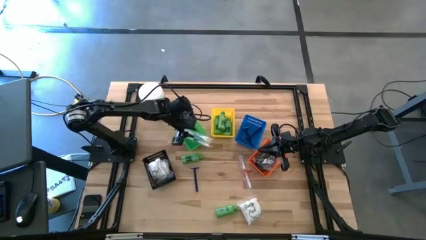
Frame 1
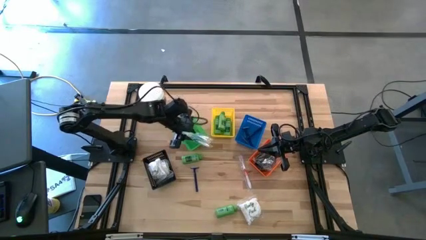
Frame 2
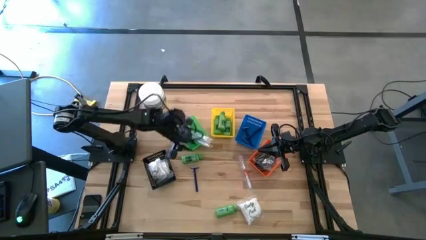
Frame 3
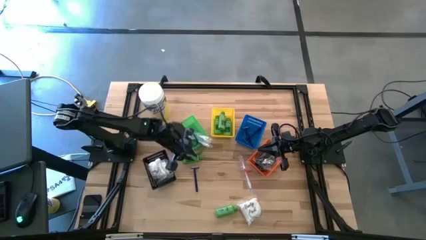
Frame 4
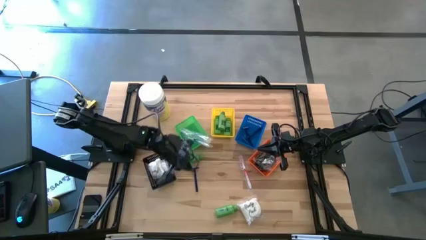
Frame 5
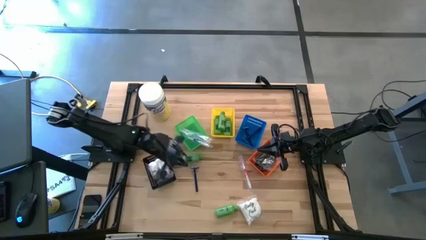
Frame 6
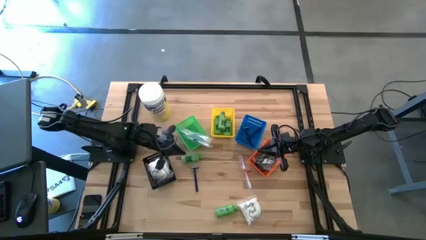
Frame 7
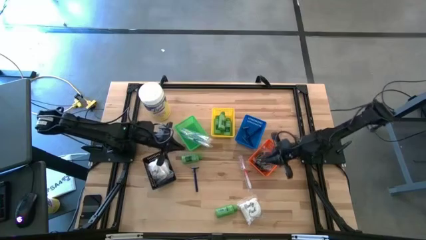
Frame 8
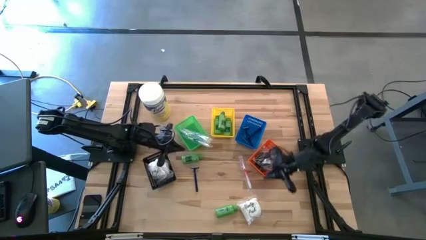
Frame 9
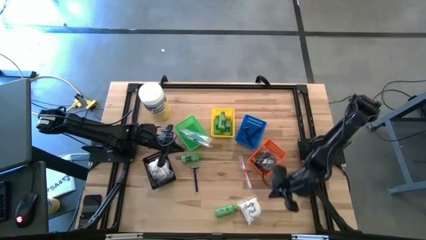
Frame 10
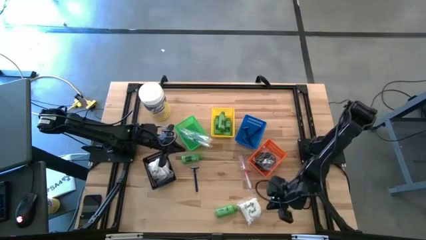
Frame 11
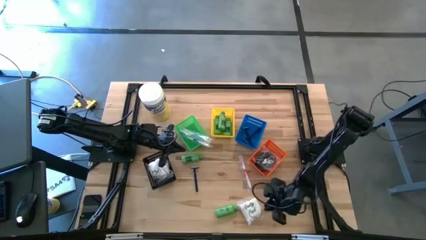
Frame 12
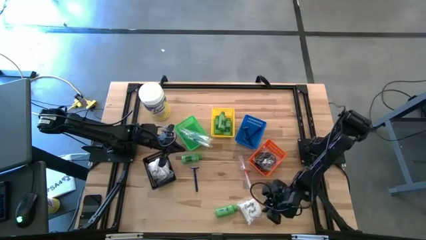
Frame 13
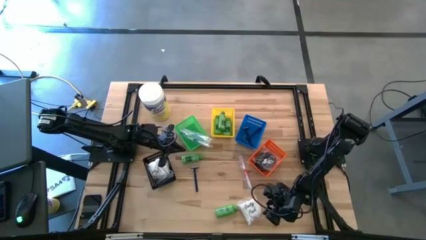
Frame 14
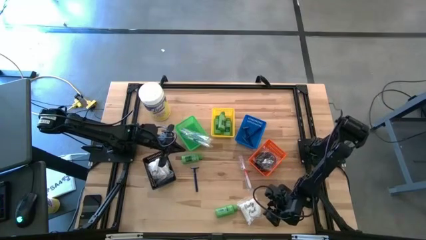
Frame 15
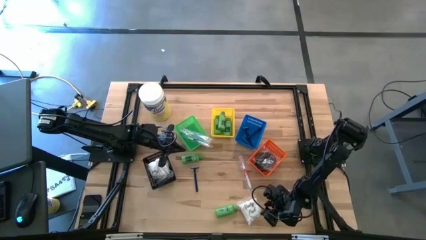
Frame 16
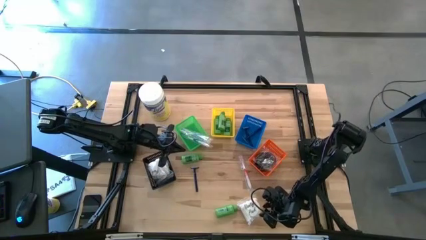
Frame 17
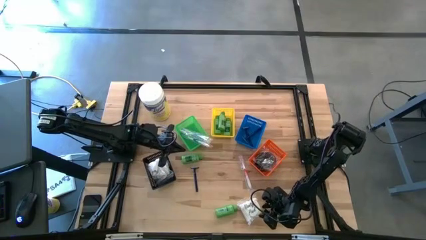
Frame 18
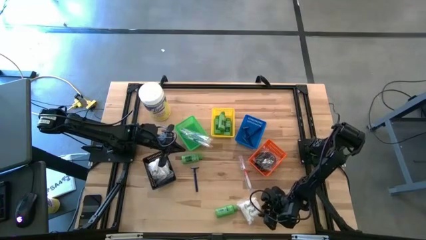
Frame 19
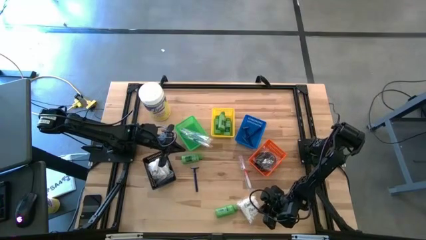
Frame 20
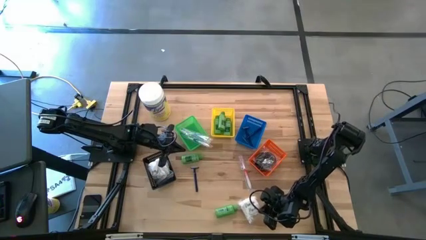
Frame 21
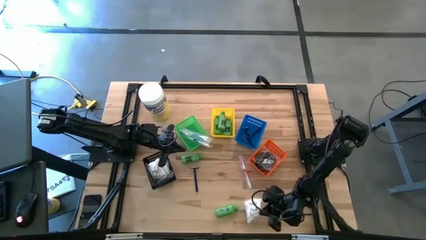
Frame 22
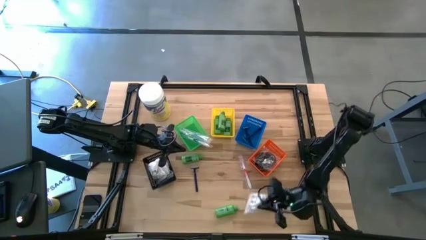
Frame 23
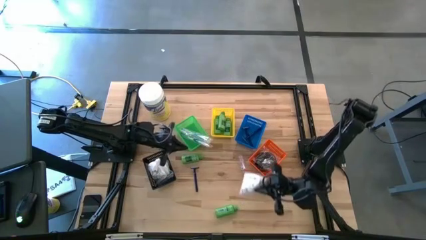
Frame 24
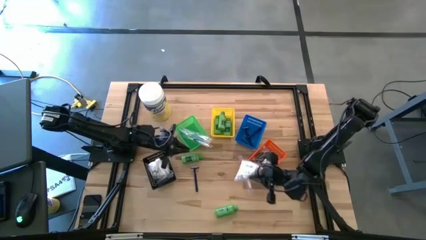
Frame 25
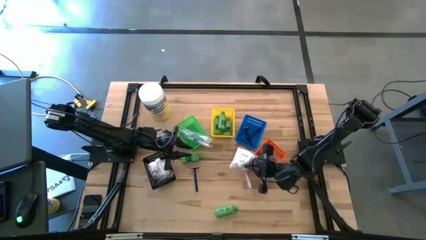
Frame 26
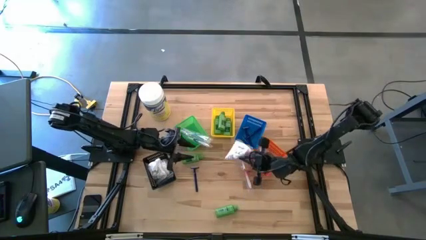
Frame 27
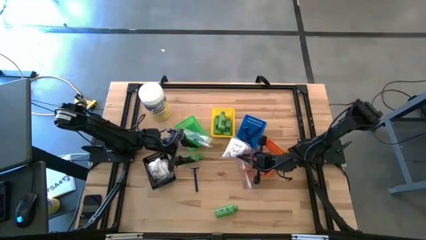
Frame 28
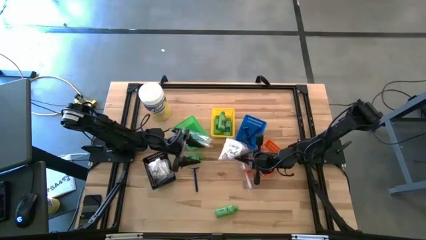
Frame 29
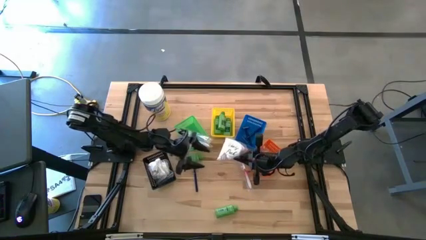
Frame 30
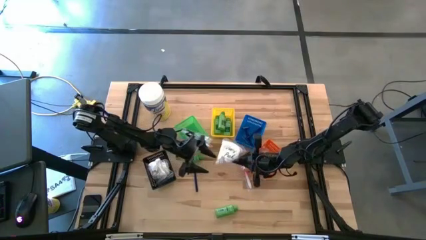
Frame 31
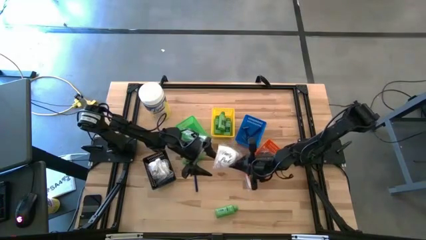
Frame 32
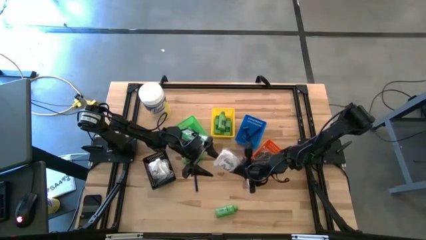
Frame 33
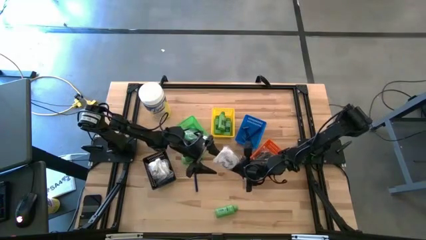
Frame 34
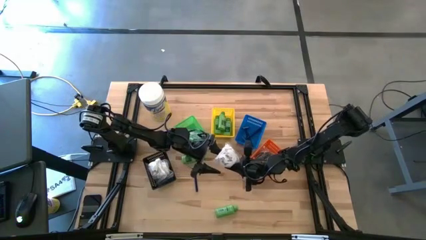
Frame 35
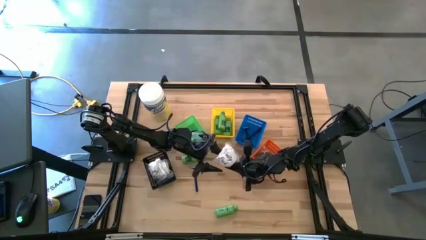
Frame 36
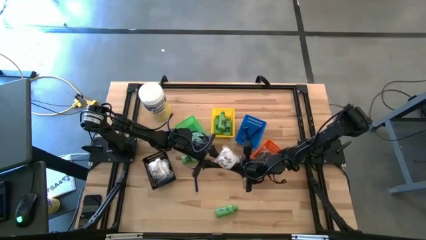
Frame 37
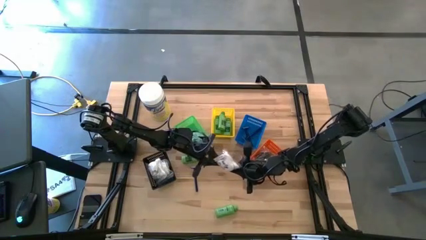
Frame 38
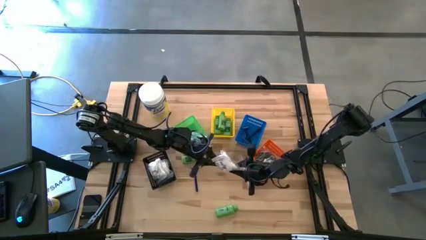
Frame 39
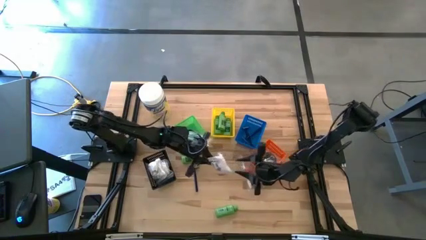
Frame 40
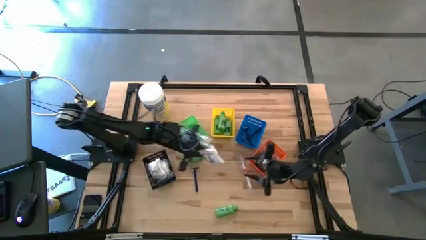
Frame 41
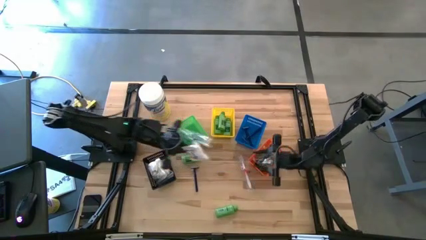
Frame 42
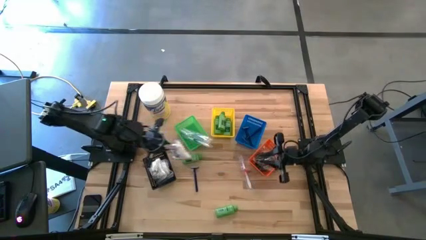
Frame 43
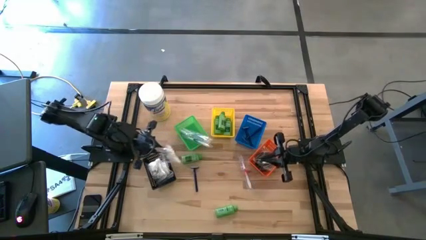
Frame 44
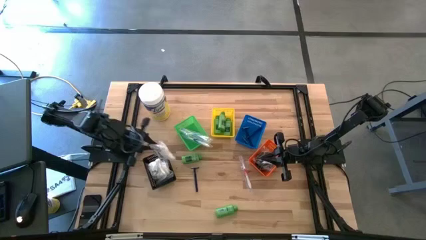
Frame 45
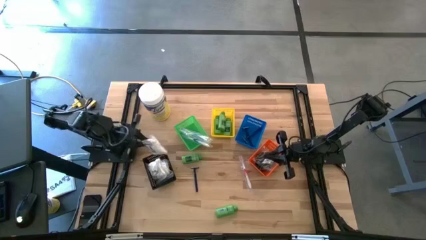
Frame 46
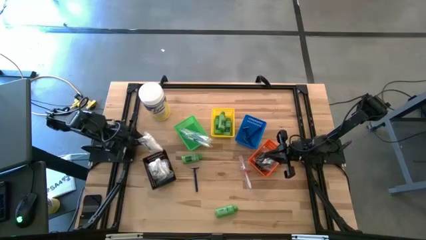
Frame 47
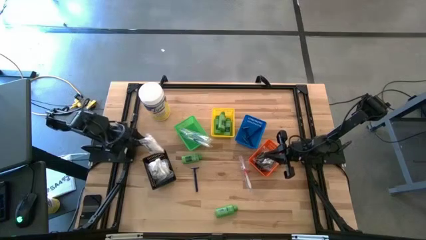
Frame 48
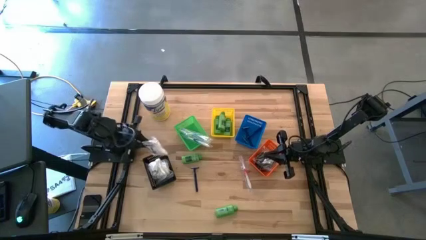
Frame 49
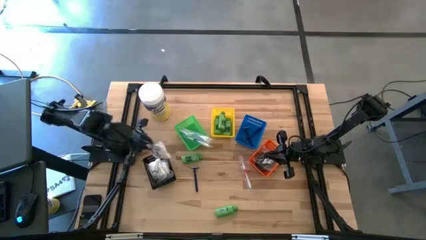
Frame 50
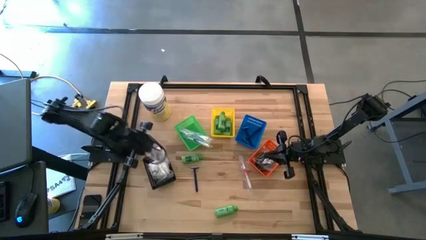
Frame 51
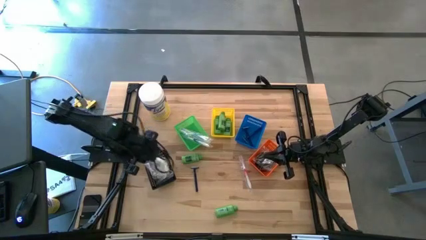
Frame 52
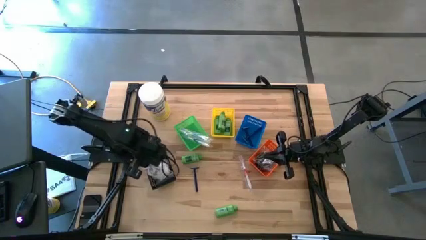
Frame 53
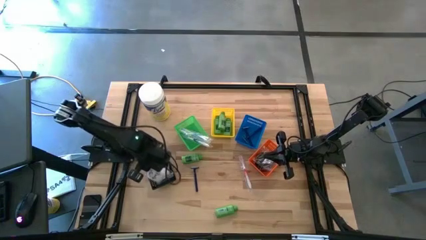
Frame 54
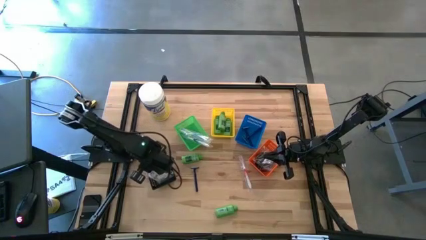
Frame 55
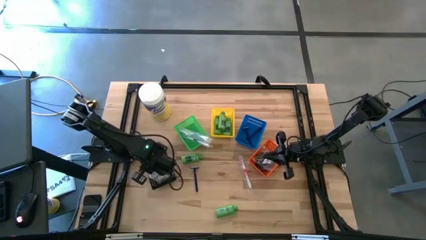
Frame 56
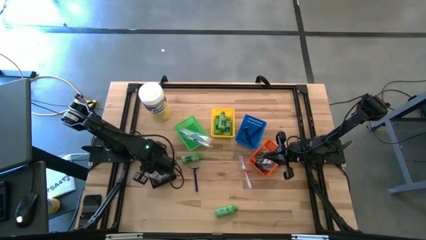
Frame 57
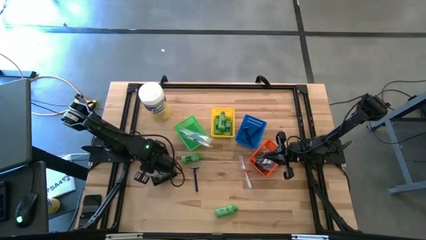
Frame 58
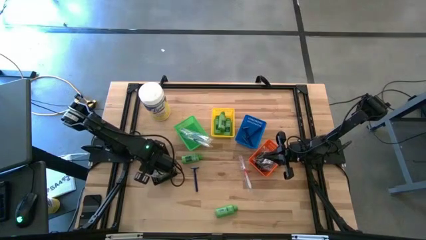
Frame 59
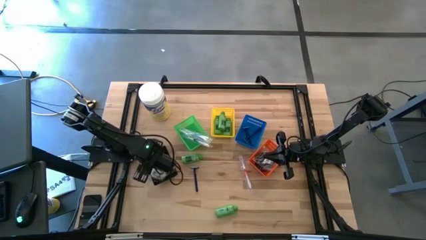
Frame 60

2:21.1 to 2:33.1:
Task: Pick & Place Travel size toiletries
Put the cotton pack into the black bin
